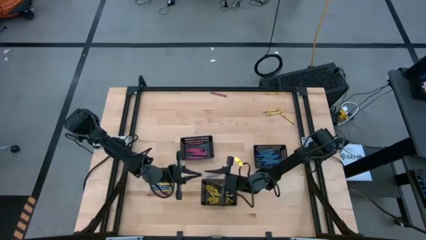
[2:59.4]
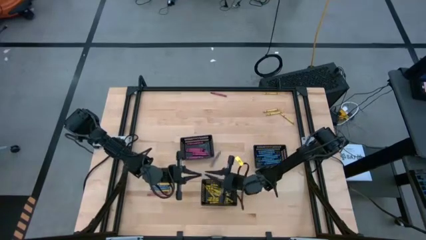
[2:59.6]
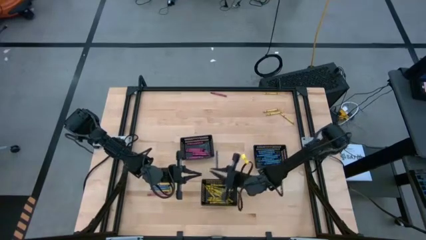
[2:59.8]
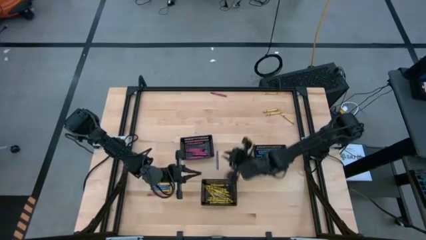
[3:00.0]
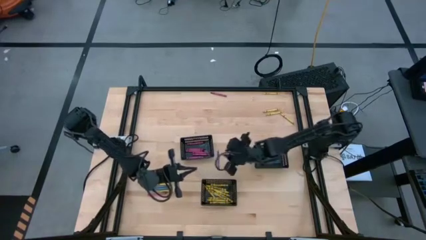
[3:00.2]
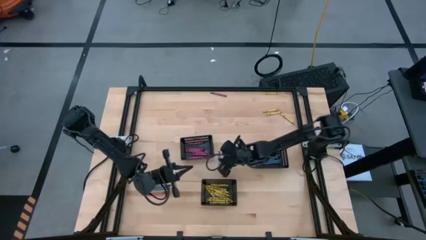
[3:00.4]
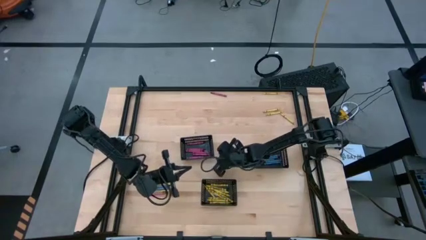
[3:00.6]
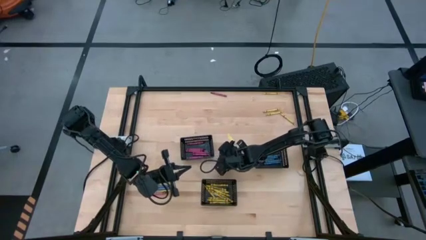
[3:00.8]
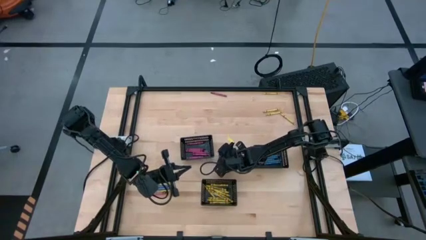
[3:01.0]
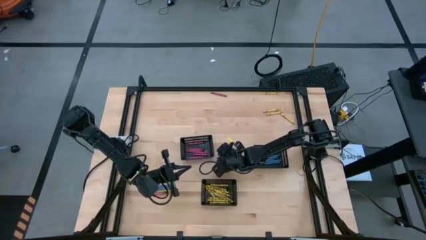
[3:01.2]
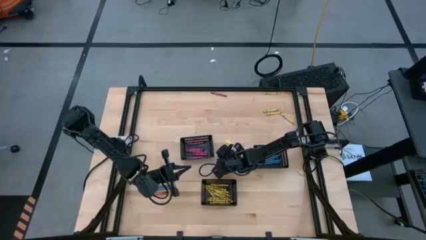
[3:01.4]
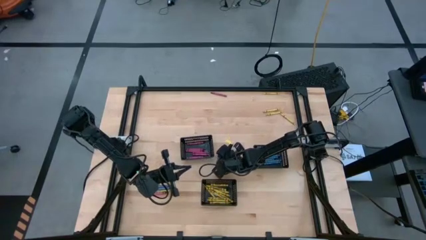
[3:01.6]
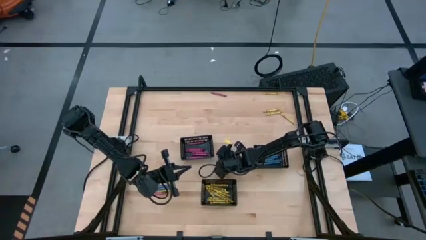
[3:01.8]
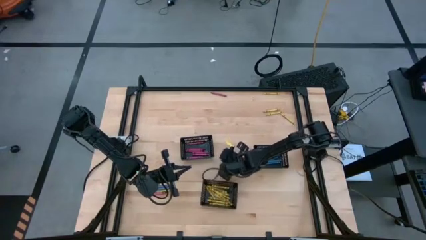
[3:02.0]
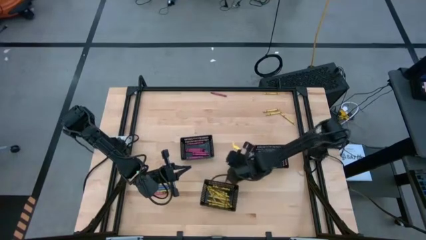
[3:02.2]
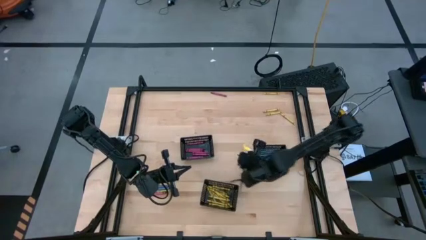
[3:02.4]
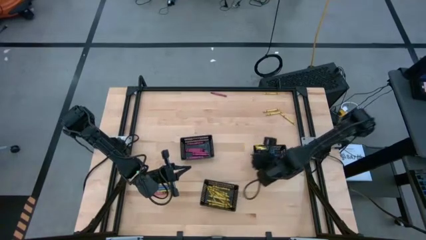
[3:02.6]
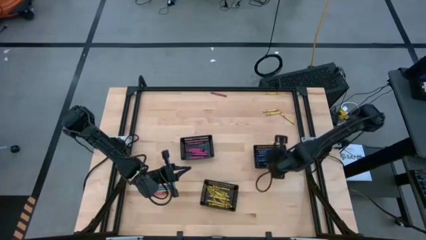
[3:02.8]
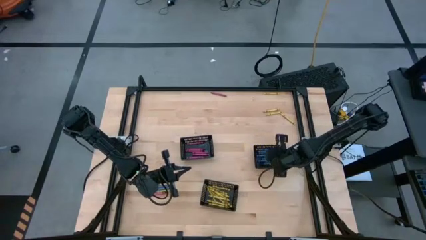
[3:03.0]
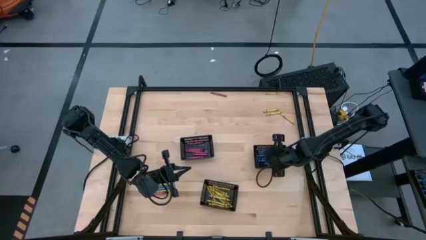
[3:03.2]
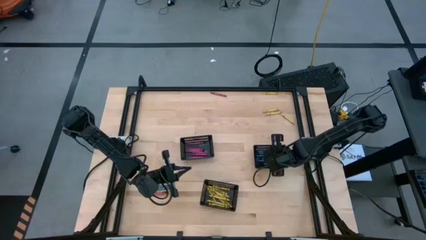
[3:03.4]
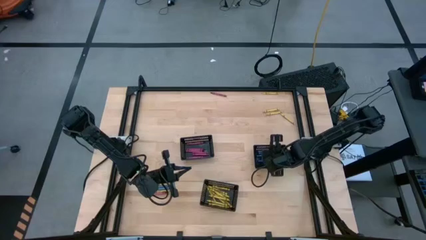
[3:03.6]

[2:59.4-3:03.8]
Task: Sort crayons
Put the blue crayon into the right black bin

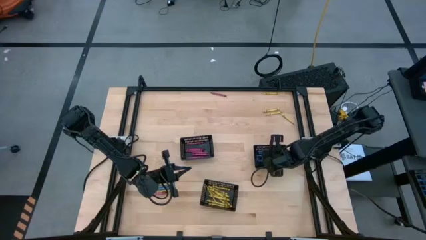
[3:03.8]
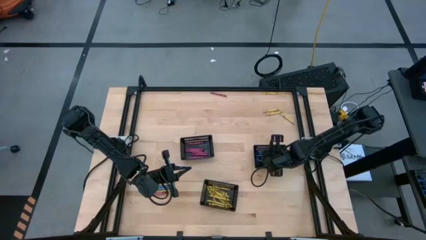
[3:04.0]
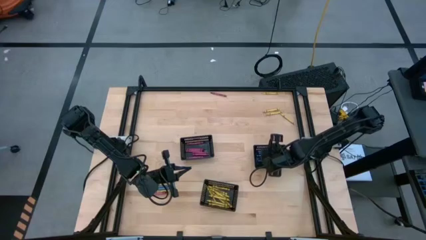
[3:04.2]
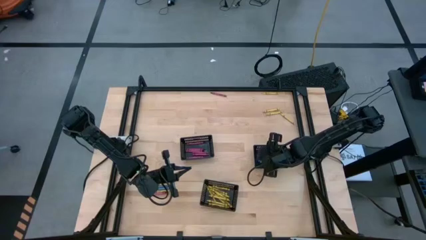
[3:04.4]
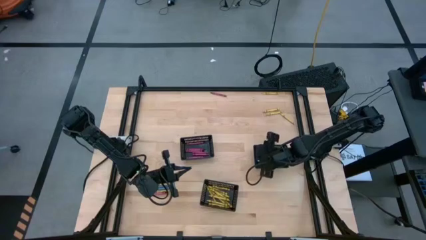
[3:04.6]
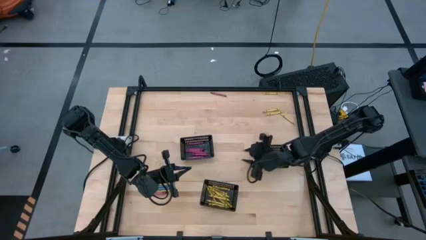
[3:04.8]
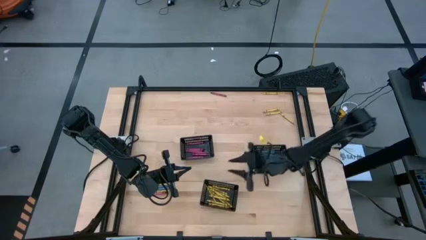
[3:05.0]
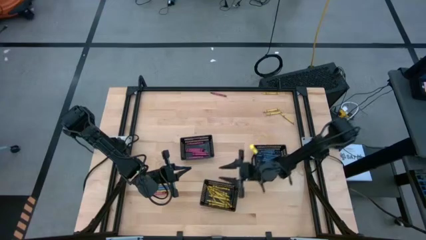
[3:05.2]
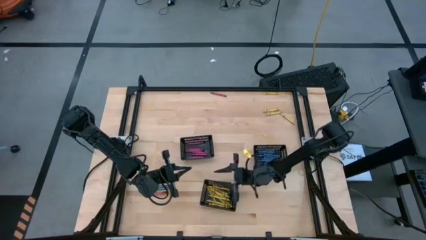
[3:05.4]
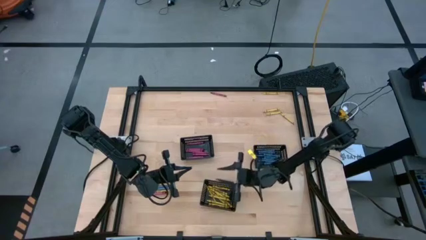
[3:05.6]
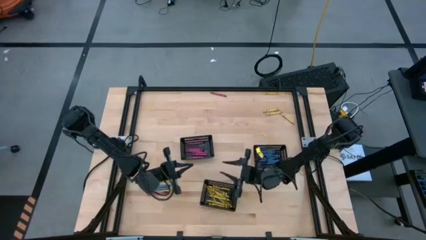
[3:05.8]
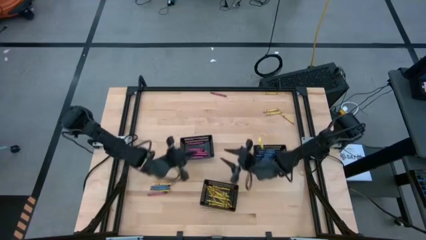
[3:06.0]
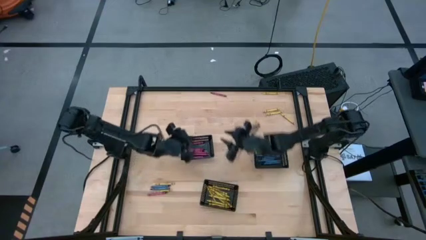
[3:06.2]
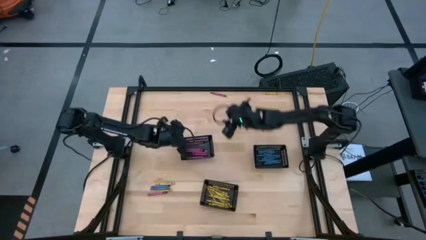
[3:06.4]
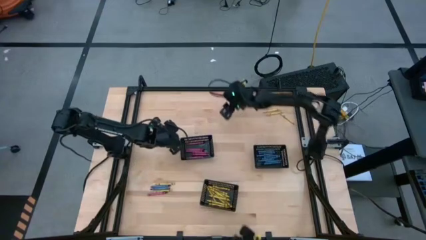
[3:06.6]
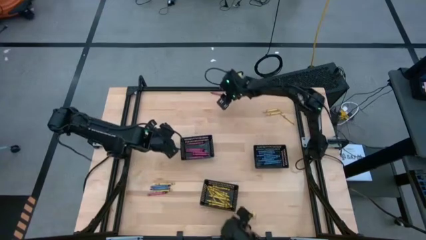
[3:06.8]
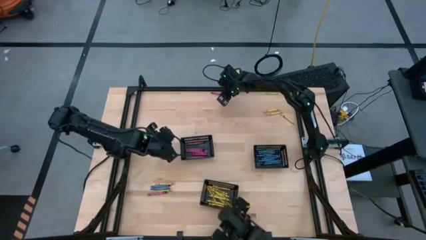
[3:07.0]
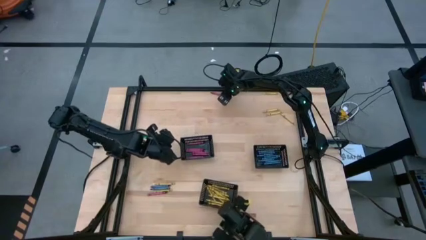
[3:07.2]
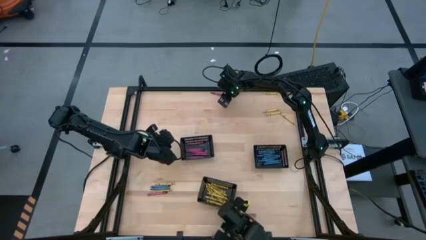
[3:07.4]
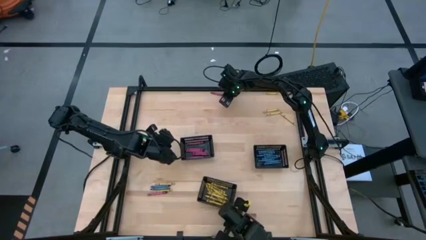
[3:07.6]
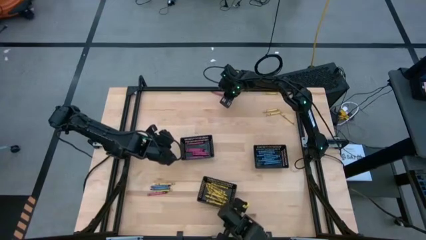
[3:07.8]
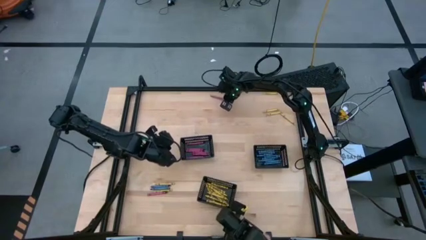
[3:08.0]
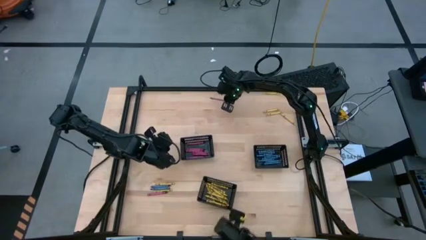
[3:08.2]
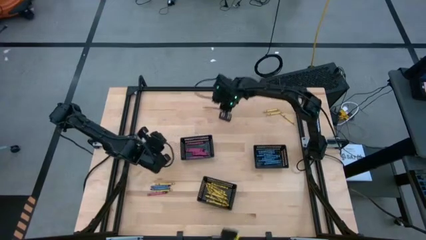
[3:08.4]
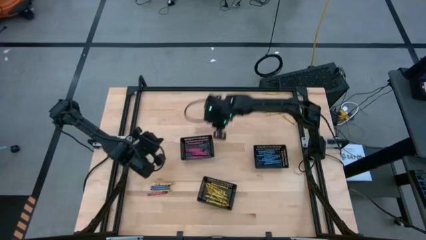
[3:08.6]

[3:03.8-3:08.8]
Put the red crayon into the left black bin

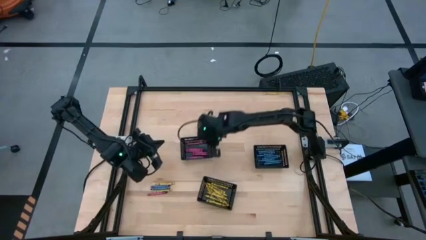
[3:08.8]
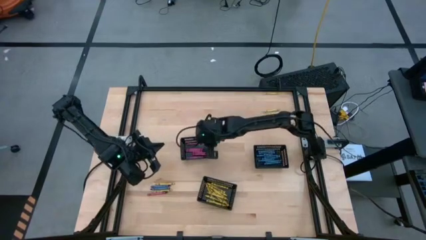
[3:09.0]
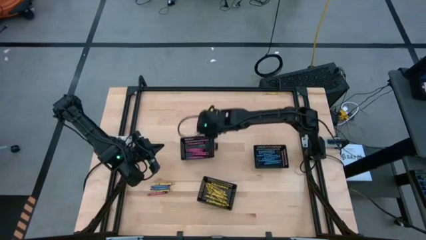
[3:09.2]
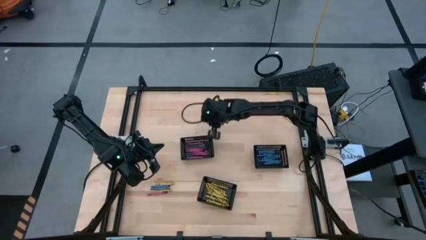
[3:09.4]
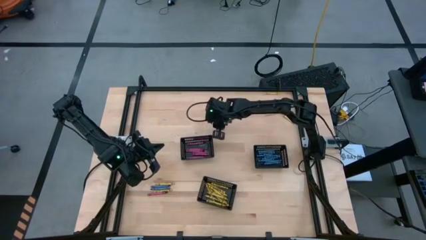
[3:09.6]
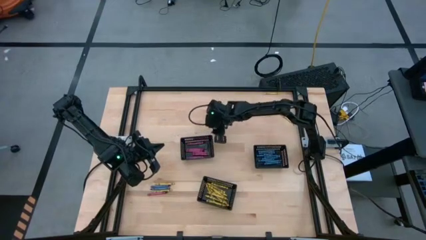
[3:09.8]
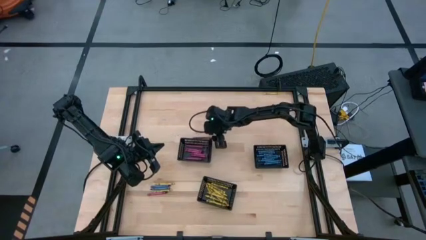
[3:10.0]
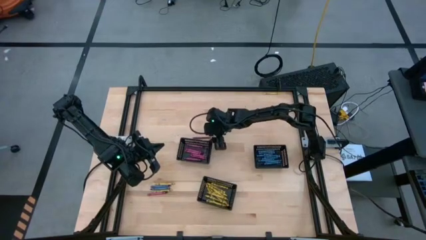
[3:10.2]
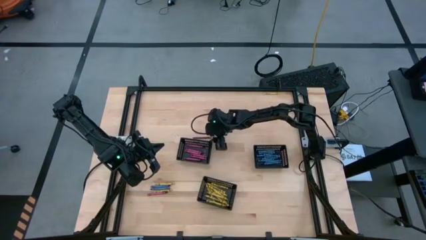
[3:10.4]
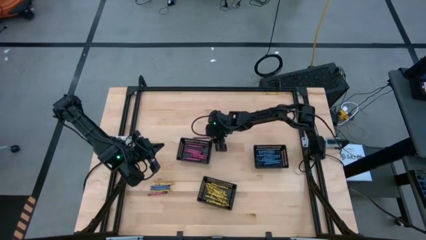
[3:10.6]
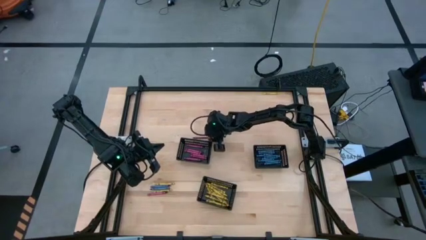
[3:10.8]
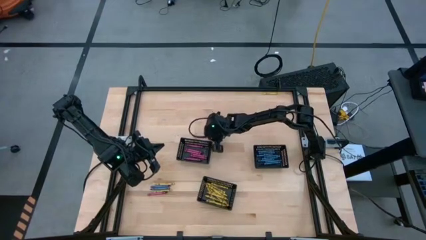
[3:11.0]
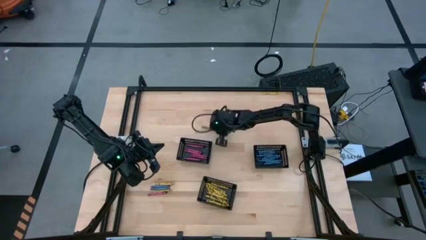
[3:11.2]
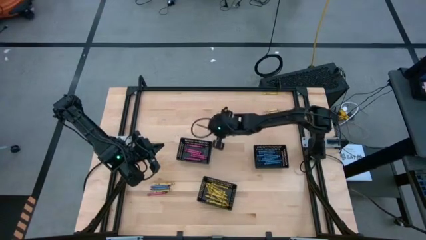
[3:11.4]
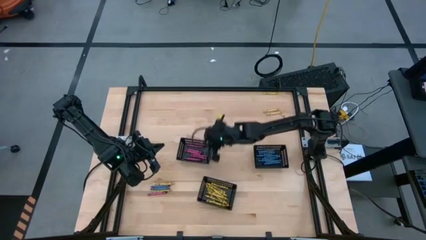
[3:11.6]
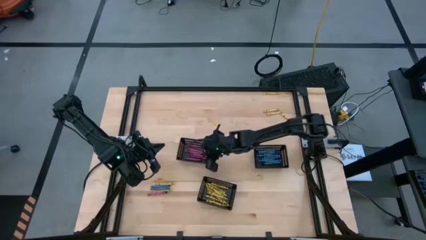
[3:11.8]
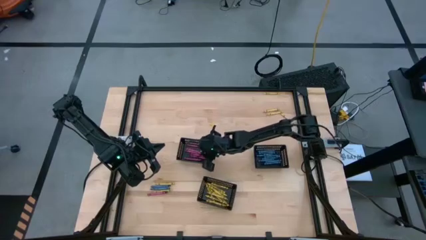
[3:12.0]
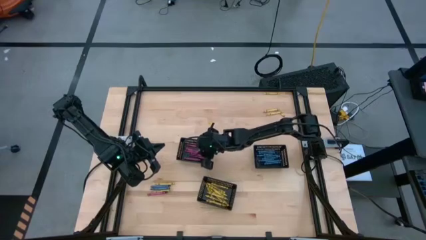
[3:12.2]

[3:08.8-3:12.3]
Put the red crayon into the left black bin

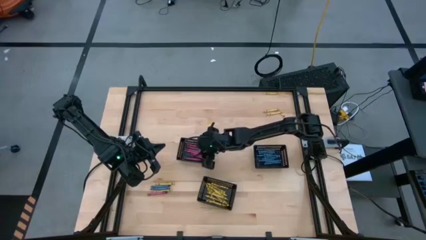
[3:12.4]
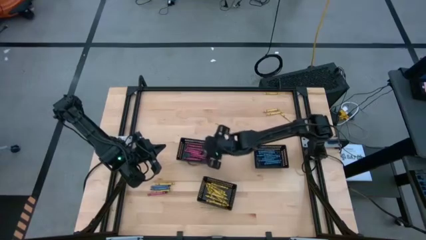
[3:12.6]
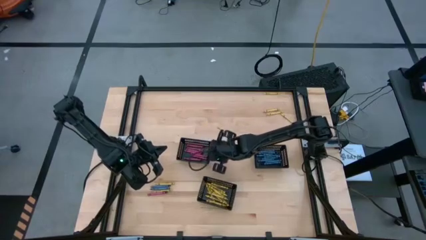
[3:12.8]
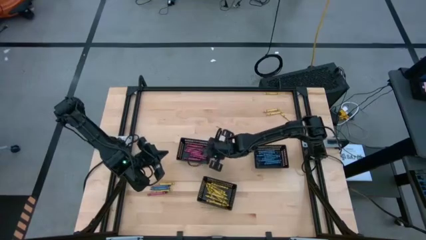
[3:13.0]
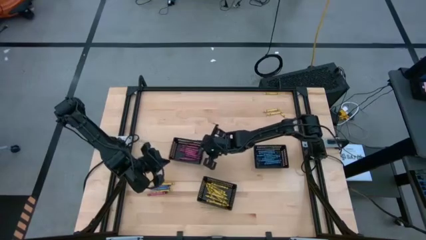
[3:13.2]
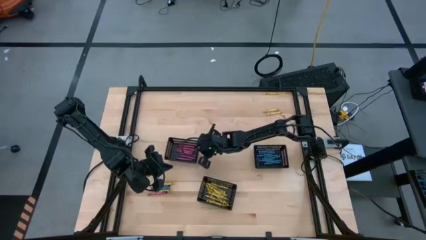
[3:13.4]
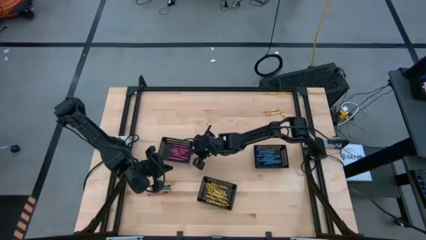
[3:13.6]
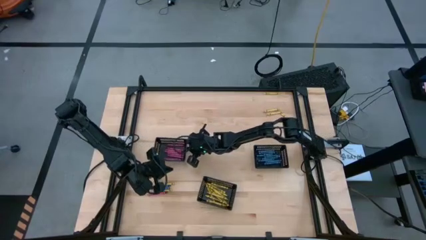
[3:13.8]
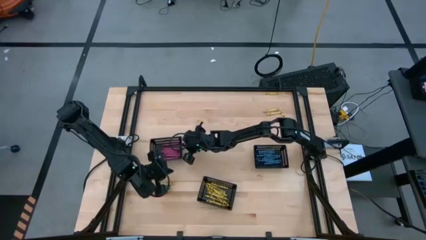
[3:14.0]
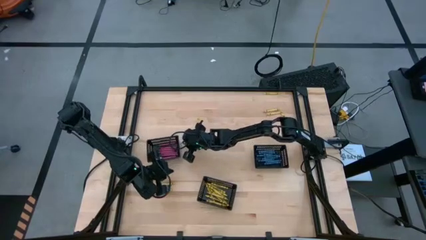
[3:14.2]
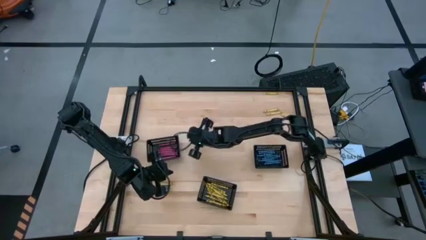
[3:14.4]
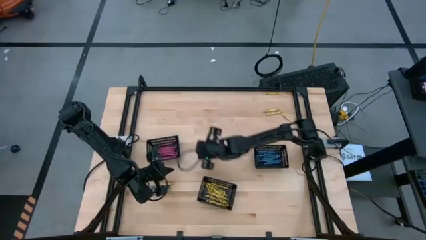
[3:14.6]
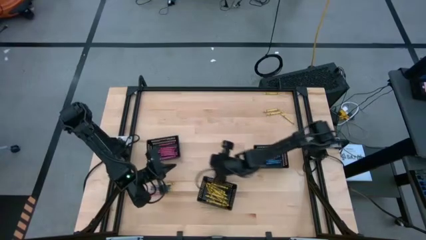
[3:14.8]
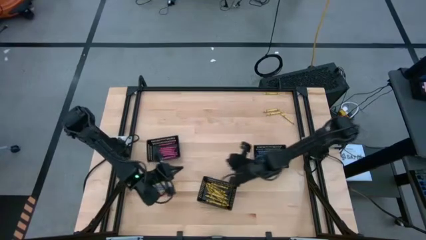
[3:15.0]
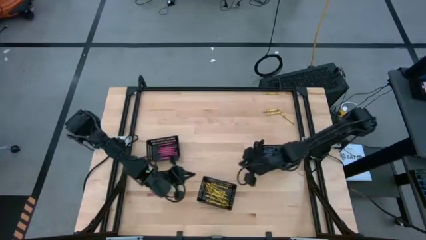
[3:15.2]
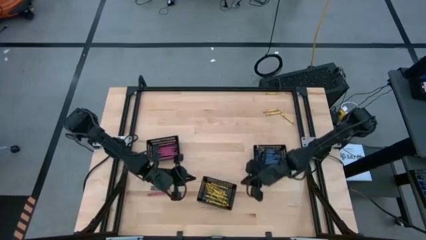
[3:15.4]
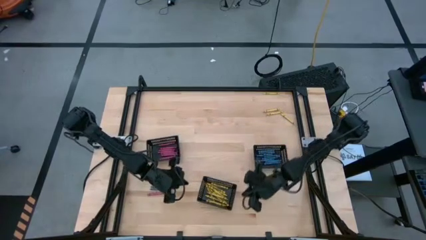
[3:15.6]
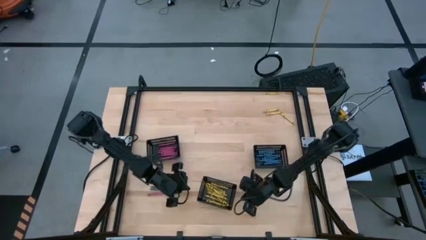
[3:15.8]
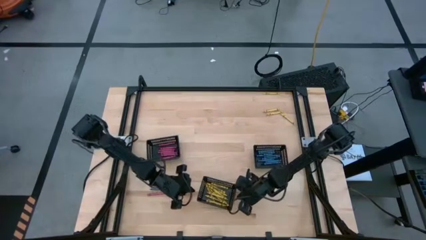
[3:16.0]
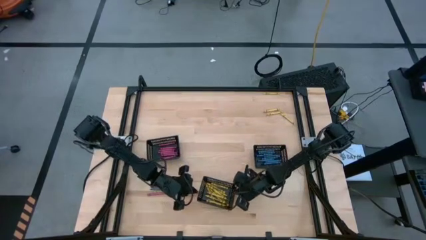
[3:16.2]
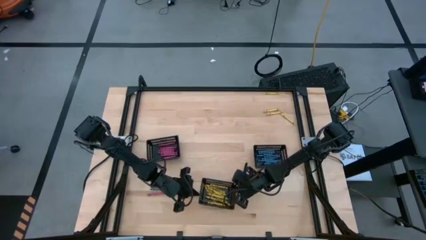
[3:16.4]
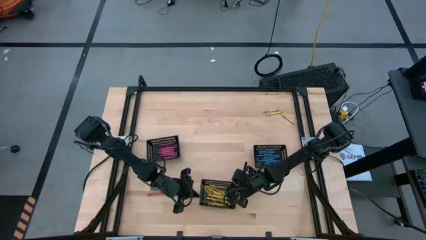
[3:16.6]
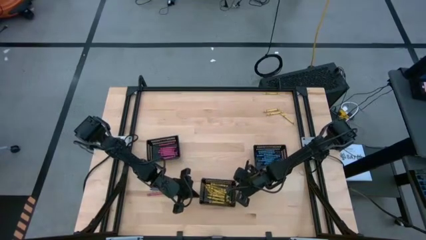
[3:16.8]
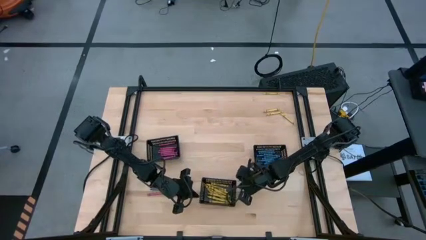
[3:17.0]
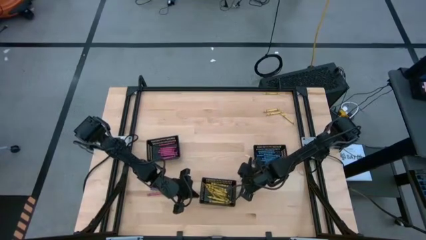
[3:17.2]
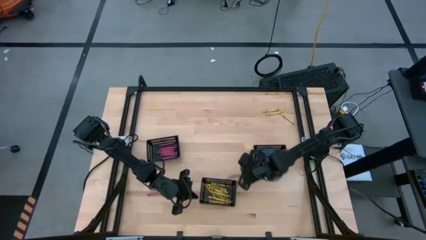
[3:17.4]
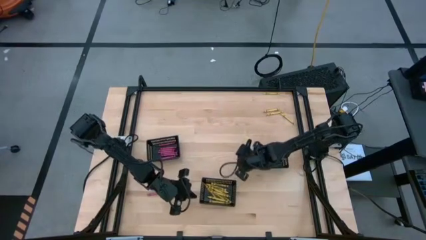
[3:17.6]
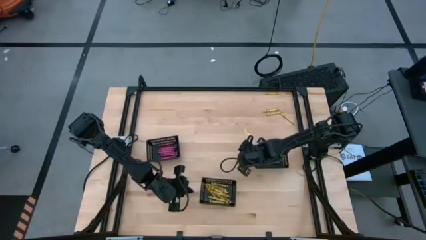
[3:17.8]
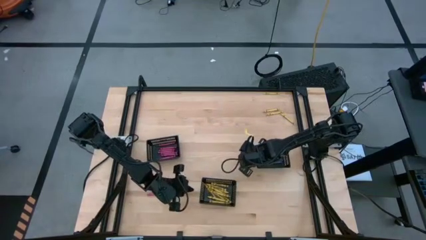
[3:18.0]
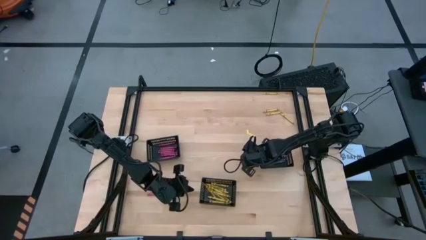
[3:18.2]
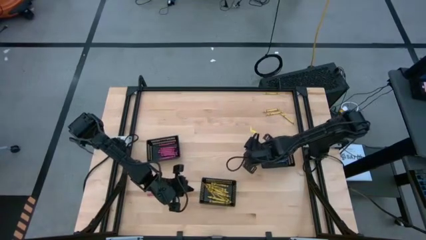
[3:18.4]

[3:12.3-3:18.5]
Adjust the black bins
